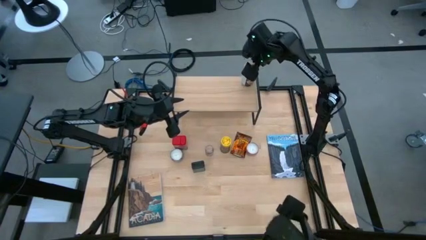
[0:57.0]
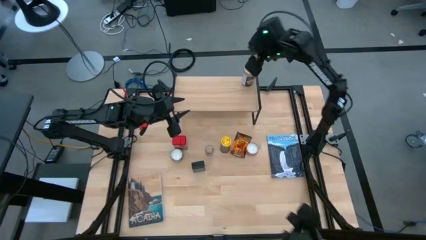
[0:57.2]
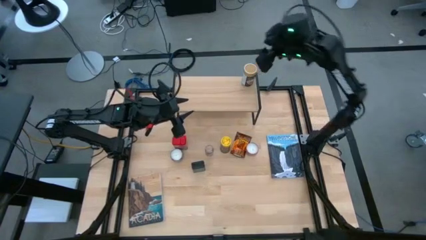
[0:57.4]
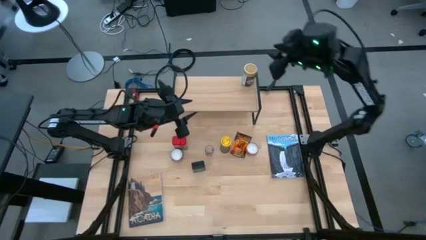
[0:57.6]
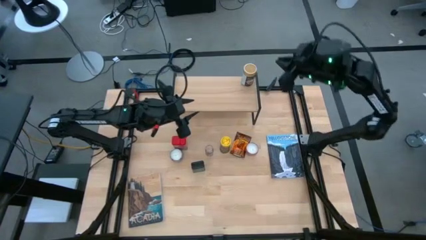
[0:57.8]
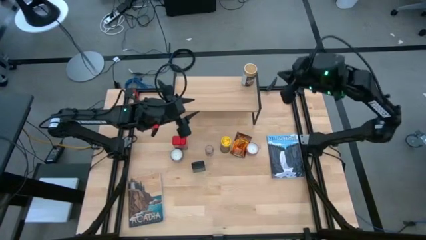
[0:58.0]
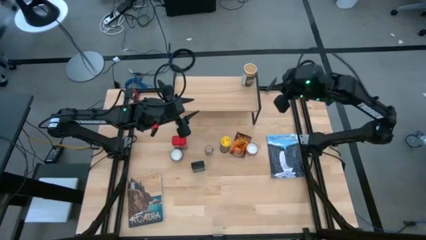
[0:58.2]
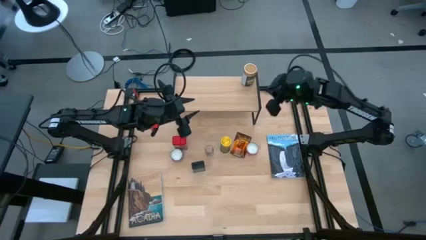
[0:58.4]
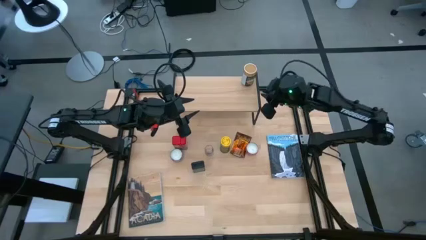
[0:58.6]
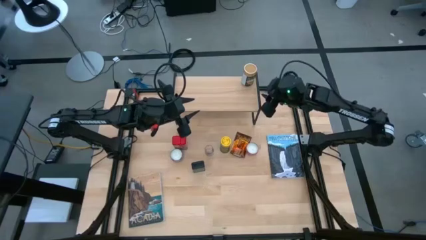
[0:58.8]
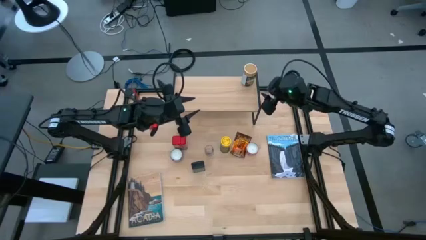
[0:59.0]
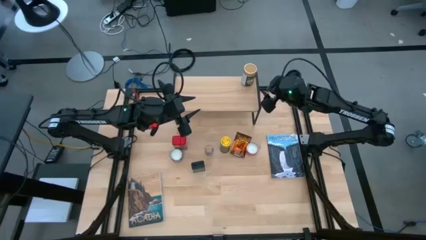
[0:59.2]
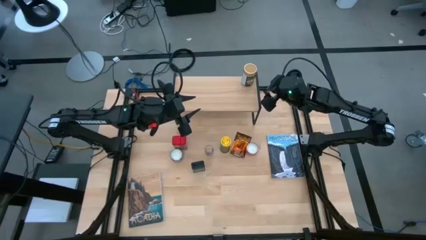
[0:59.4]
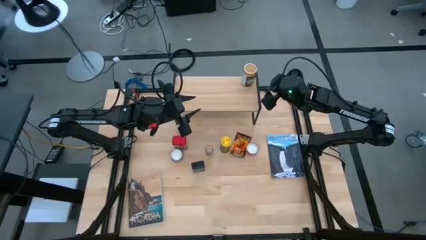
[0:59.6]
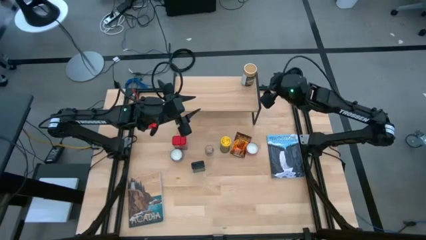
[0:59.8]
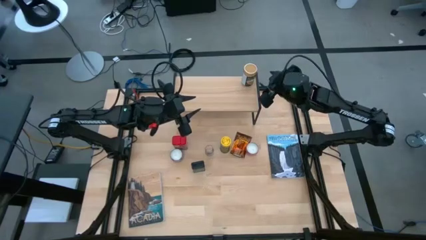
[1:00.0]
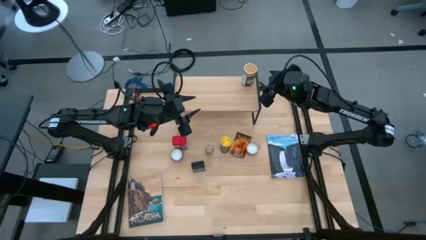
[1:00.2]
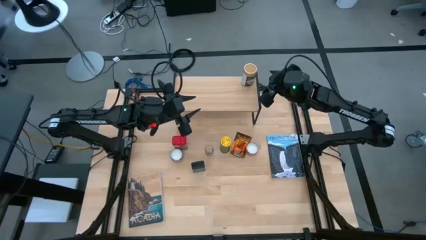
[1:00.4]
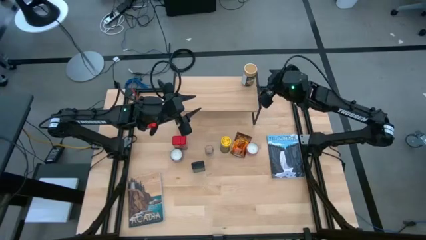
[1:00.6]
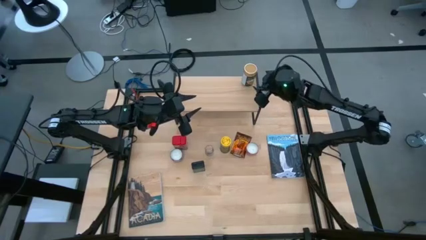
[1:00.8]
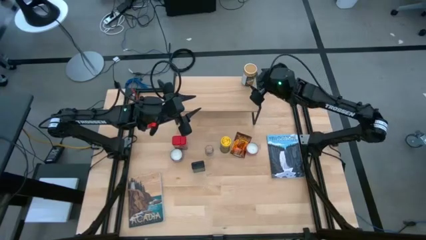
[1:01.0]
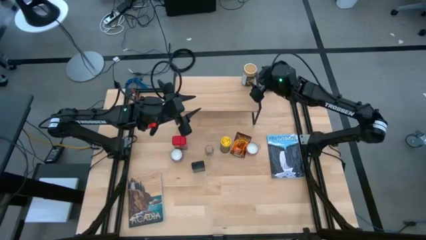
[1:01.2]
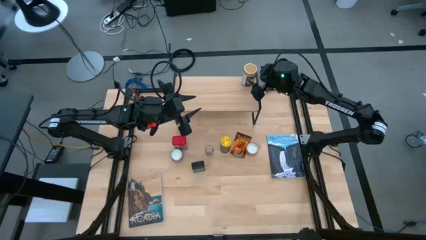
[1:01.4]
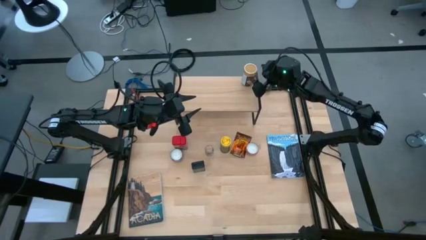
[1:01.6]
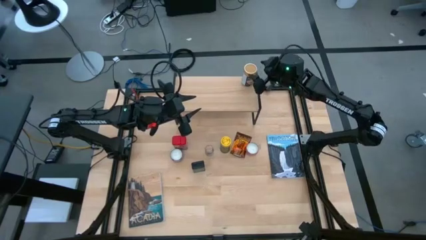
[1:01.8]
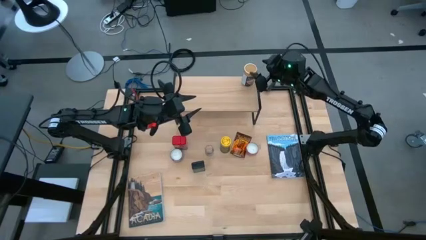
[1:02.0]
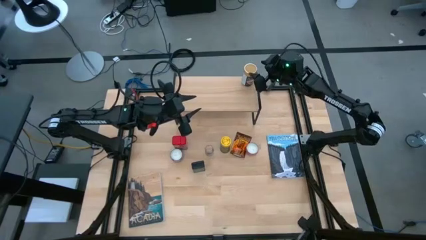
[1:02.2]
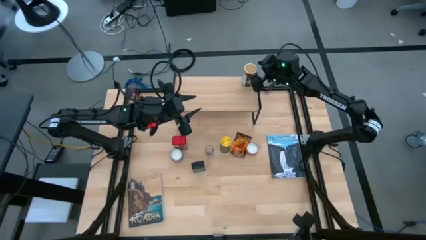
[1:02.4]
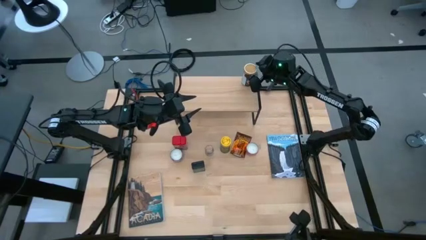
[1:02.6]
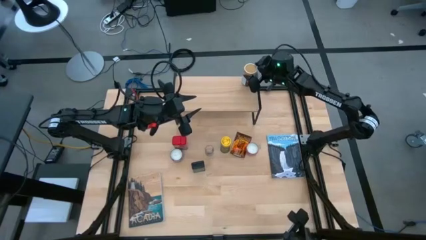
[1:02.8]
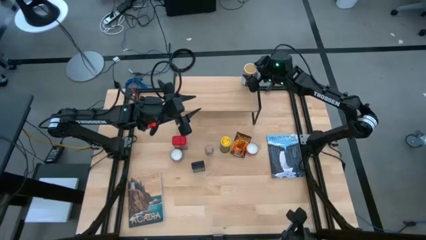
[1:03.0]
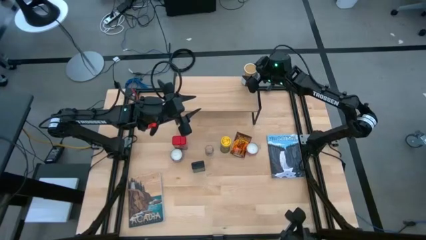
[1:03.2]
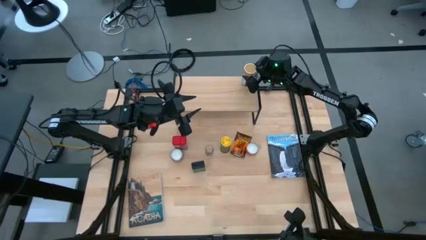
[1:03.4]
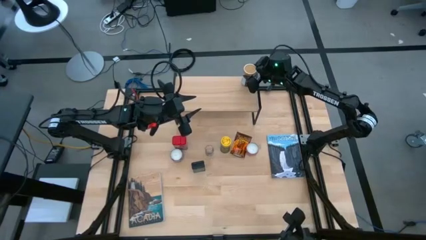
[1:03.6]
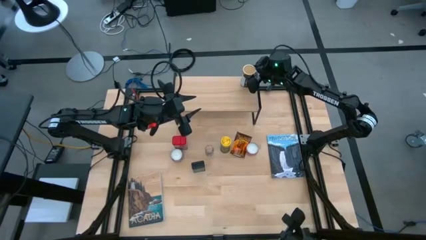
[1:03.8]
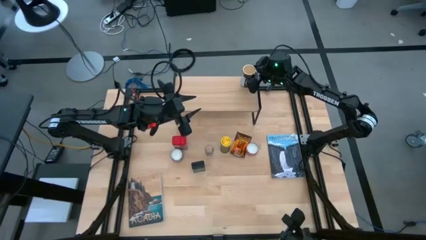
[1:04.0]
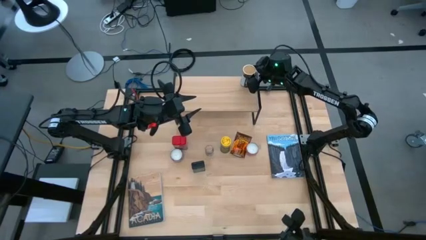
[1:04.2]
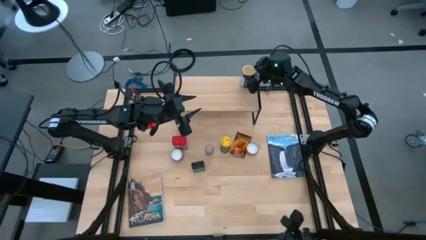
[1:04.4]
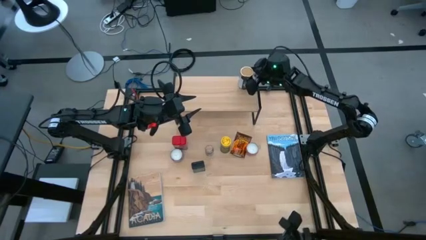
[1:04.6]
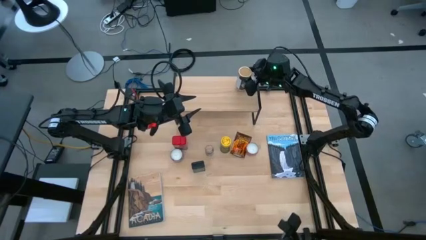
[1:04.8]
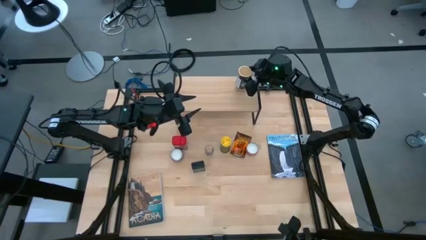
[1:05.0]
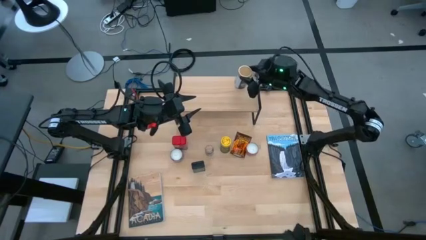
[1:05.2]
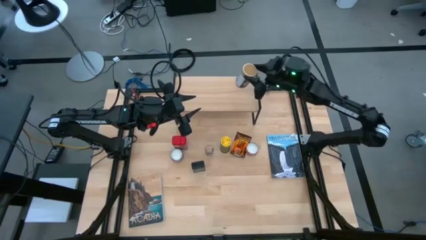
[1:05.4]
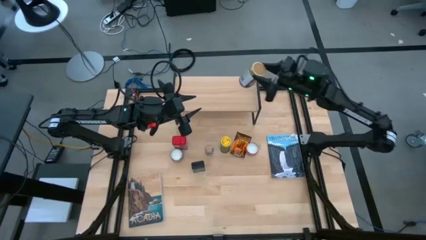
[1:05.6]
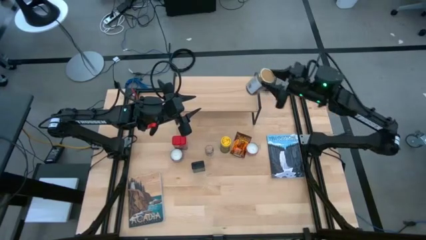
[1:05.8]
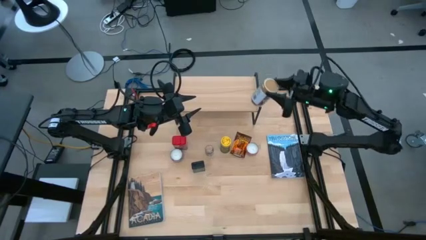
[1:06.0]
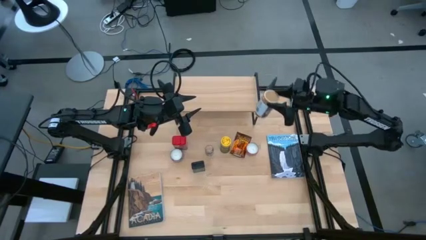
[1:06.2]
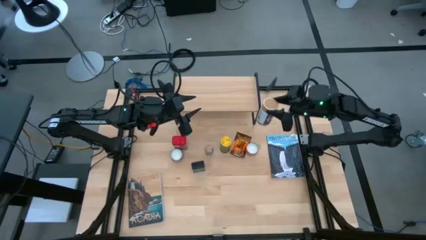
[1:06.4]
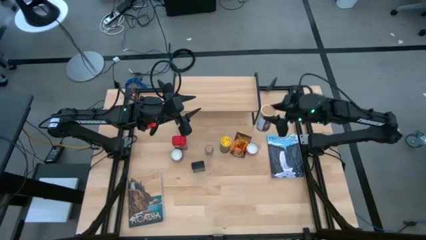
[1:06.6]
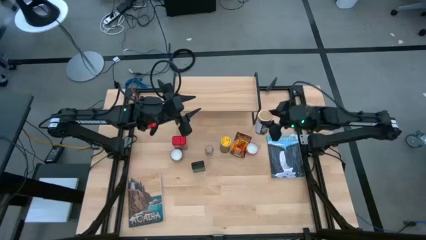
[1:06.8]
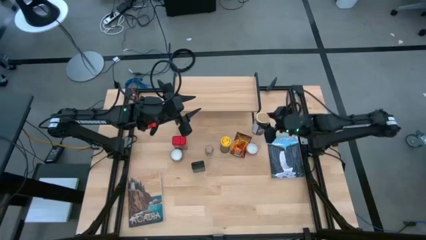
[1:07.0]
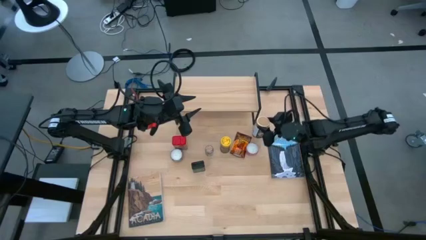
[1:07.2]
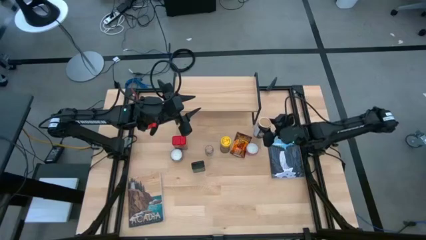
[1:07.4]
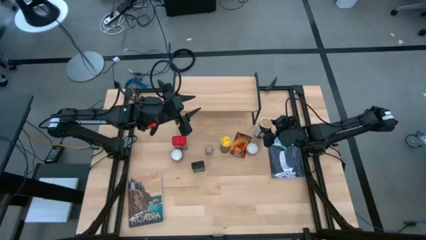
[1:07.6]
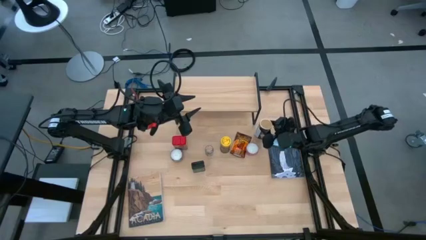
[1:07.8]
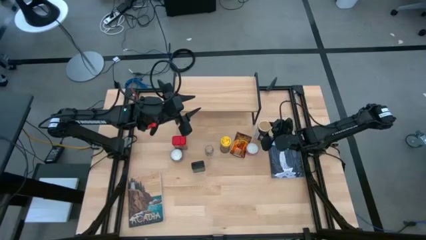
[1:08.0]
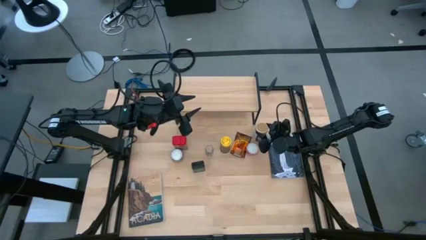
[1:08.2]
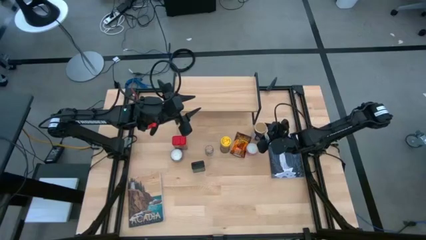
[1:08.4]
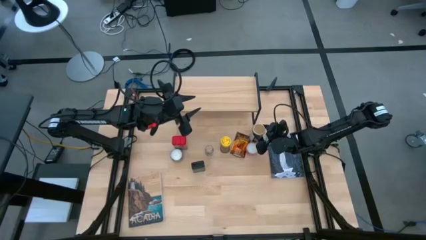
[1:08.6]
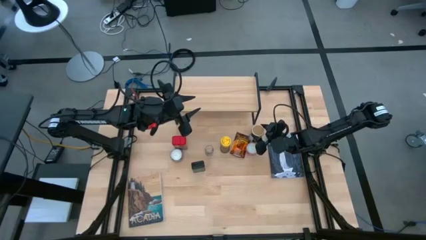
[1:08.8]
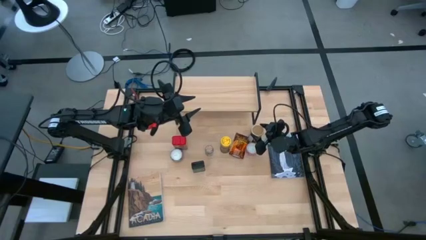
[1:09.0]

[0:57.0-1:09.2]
Task: Shelf spices
Remove the gold seasoning bottle from the shelf

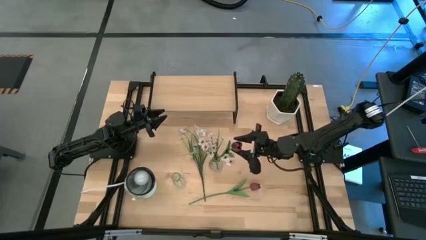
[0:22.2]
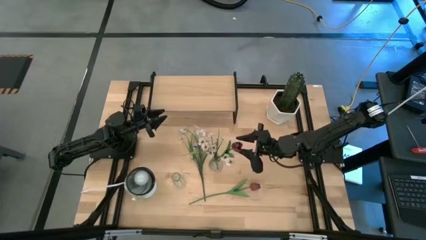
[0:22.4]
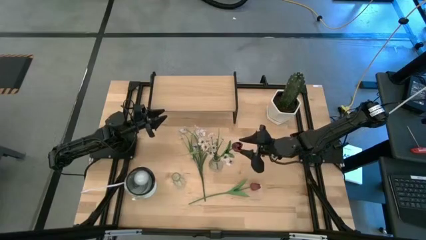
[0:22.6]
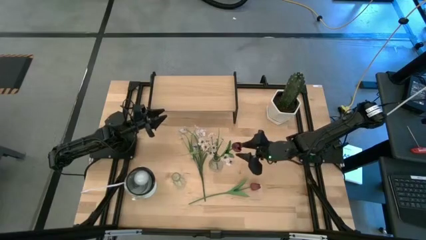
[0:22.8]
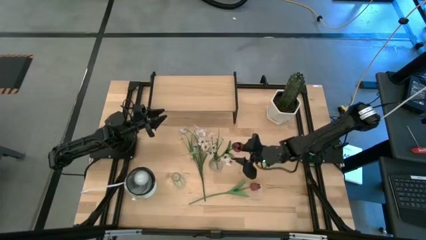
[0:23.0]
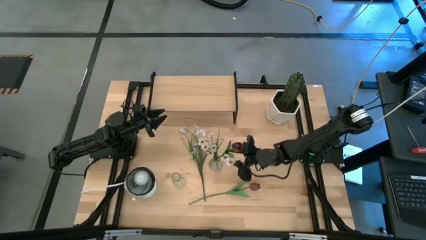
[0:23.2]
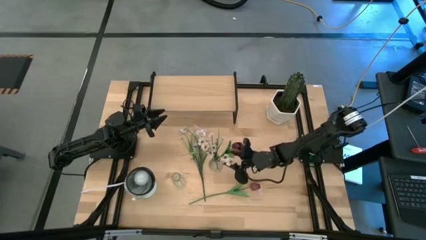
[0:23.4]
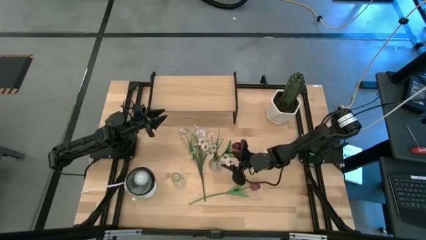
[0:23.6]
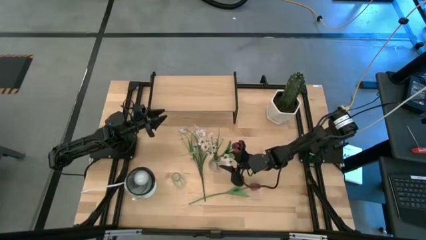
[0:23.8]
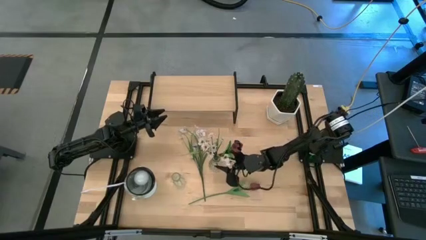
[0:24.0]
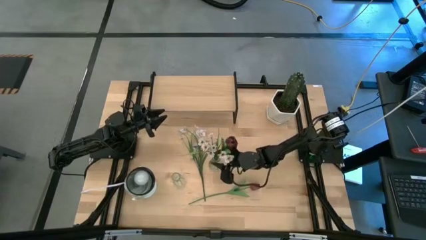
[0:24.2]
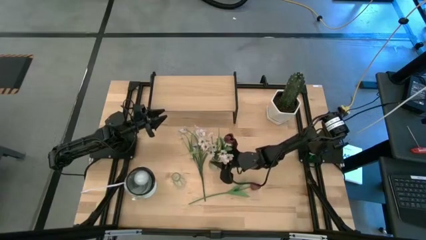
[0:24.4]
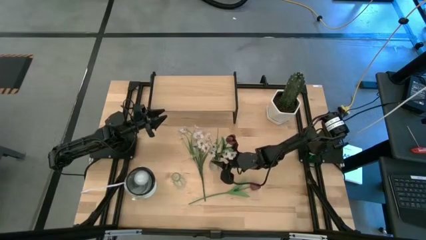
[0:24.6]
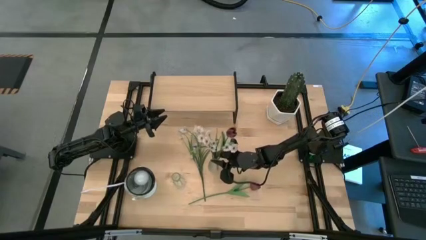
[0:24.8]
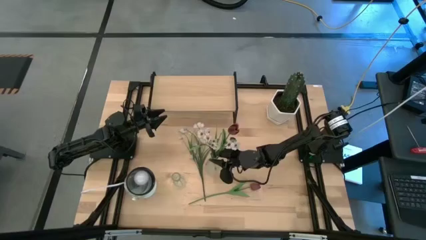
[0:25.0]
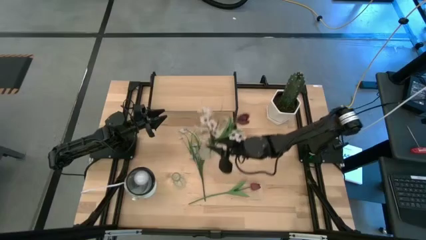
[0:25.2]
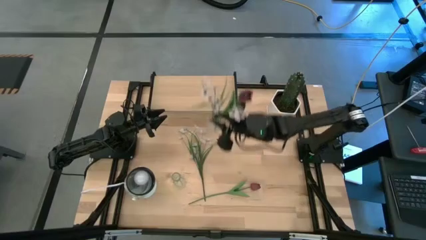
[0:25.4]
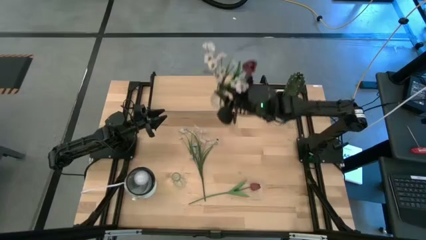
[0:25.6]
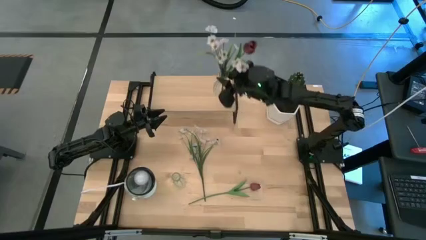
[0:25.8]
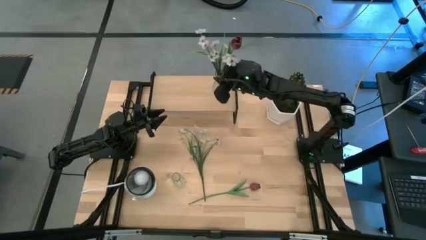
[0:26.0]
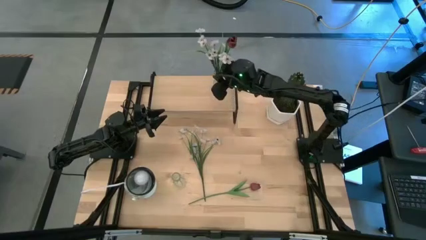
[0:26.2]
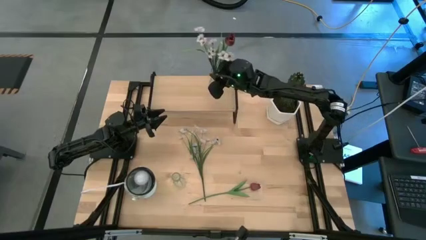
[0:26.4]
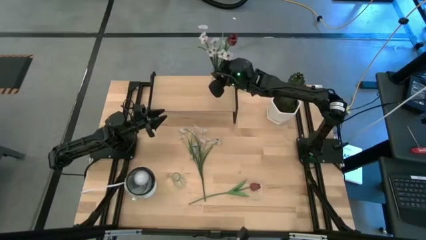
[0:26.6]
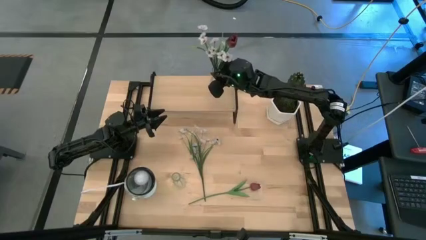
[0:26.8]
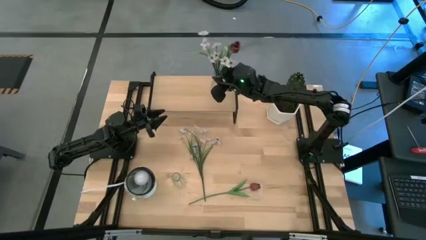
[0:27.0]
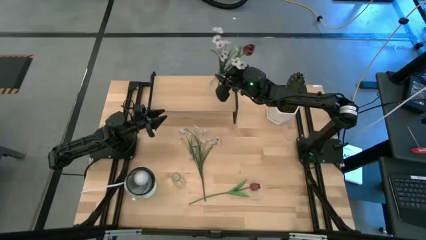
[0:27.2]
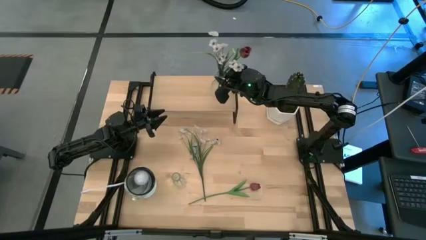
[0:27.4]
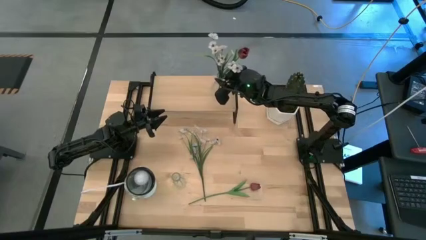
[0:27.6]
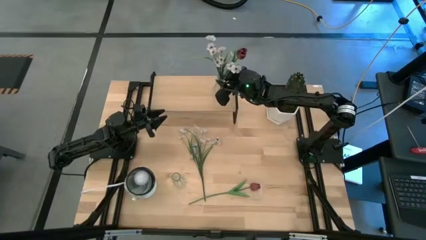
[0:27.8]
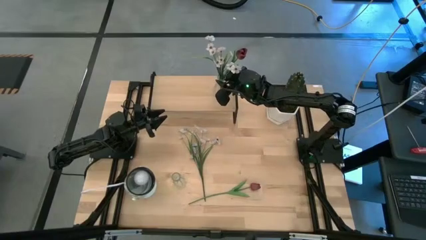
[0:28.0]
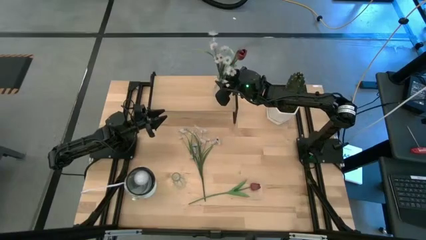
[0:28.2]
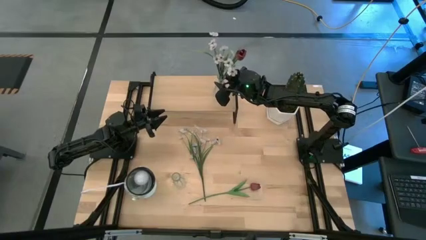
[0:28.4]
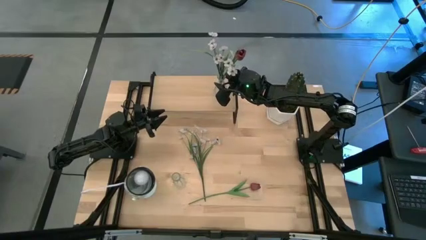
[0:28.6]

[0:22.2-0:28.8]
Task: Pick and place flowers into a vace then onto a shelf
Put the right transparent vase with flowers on the shelf
